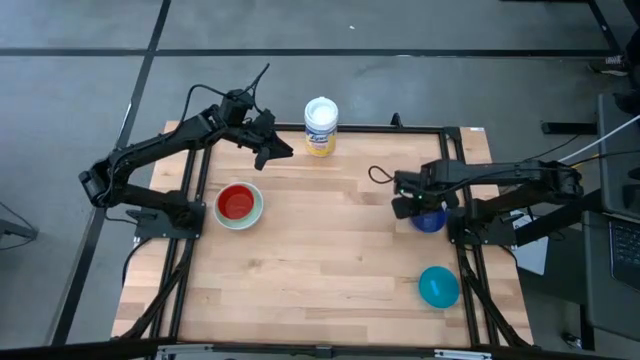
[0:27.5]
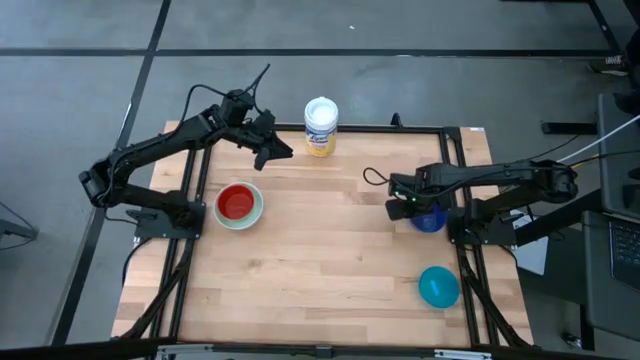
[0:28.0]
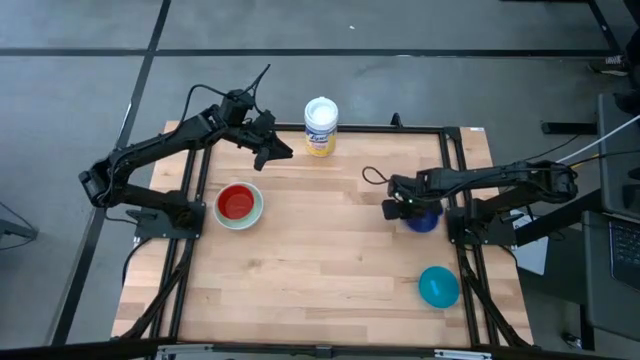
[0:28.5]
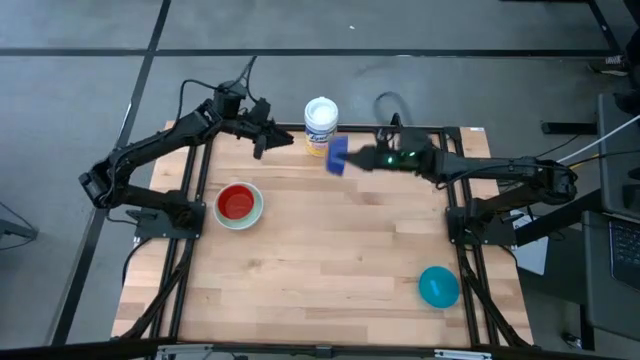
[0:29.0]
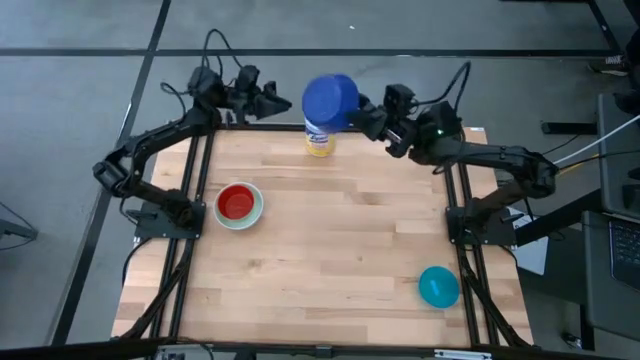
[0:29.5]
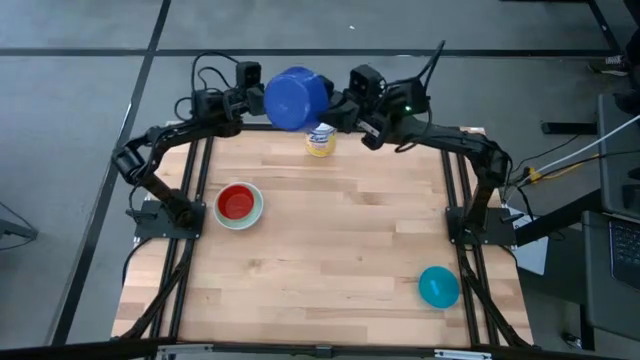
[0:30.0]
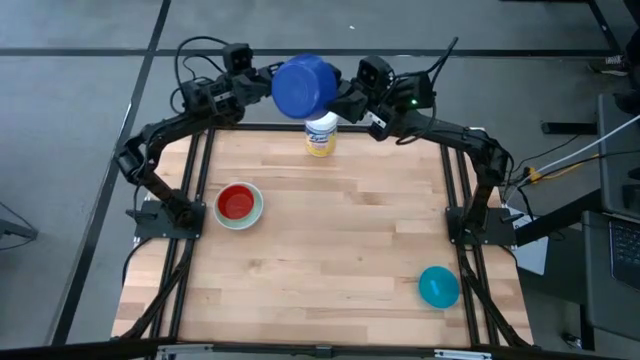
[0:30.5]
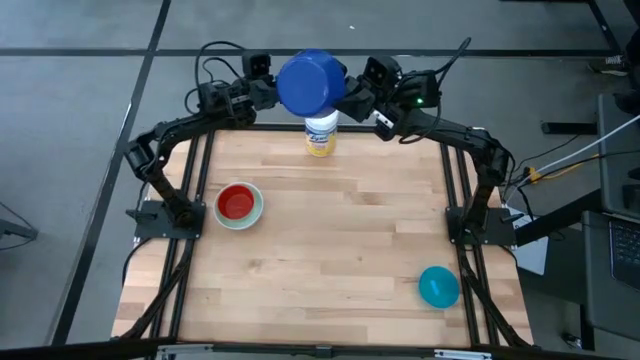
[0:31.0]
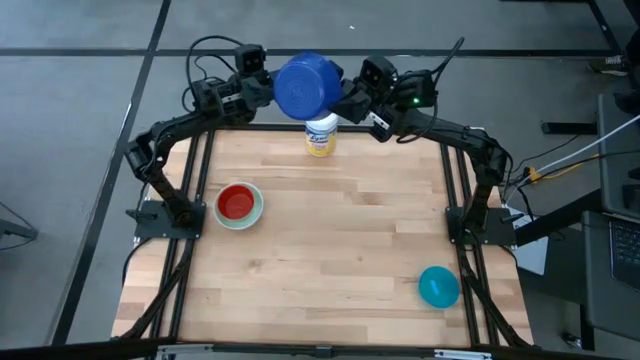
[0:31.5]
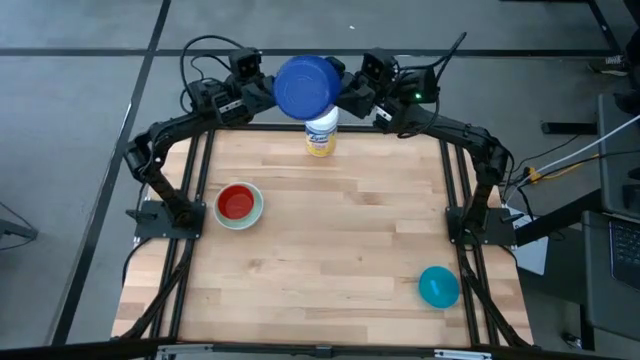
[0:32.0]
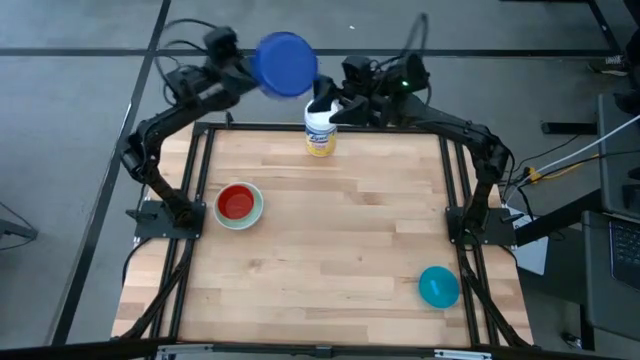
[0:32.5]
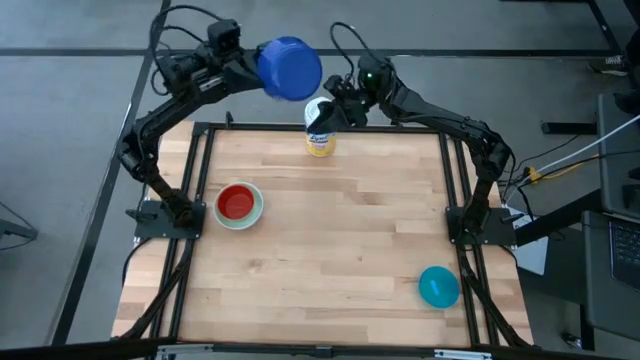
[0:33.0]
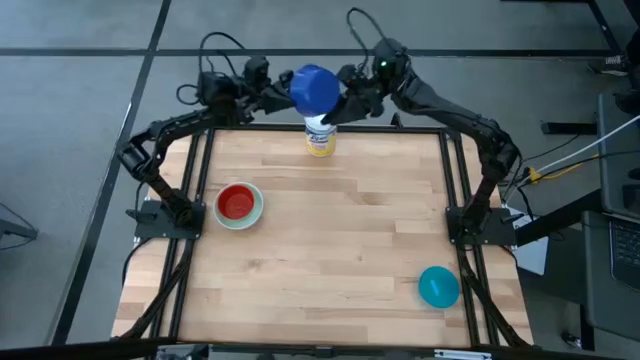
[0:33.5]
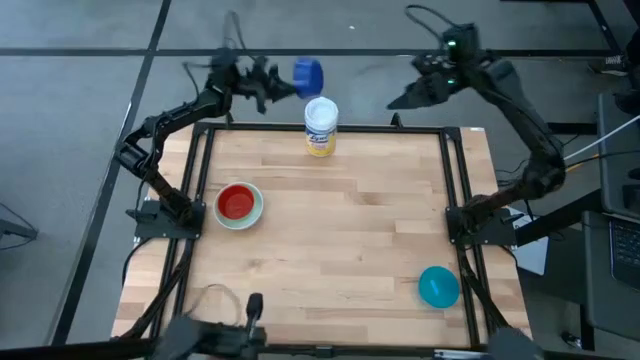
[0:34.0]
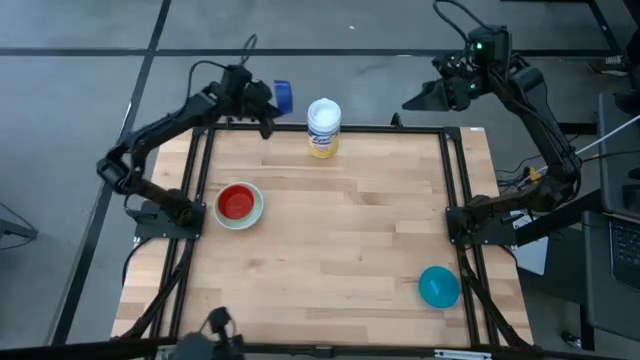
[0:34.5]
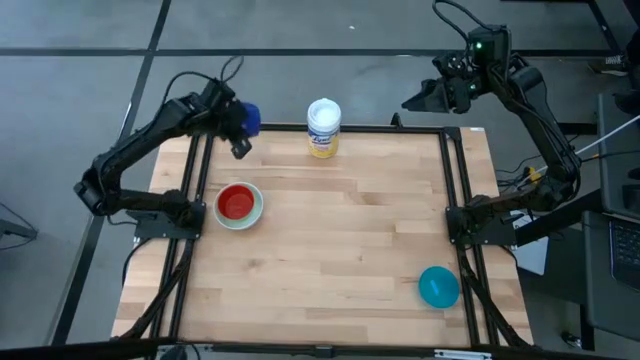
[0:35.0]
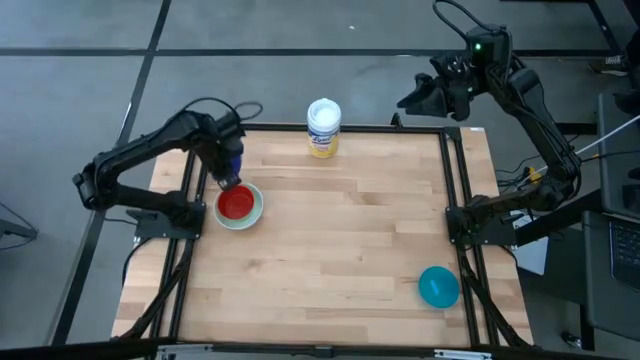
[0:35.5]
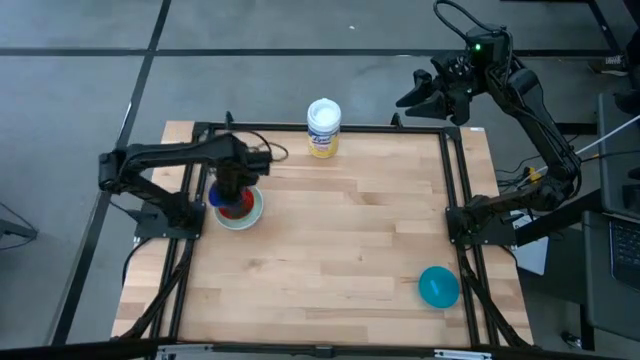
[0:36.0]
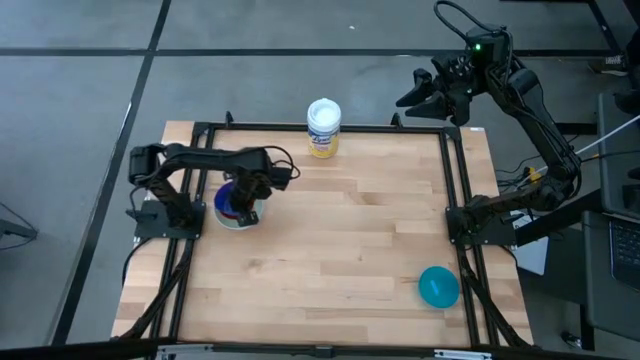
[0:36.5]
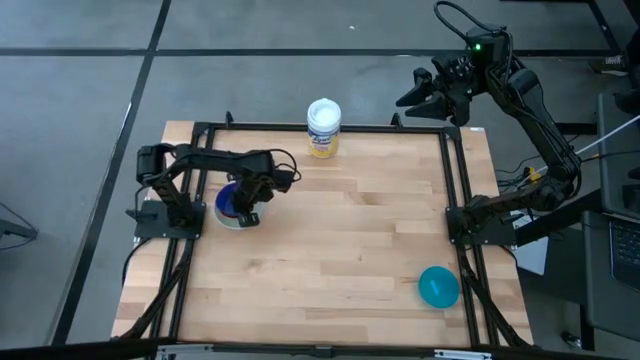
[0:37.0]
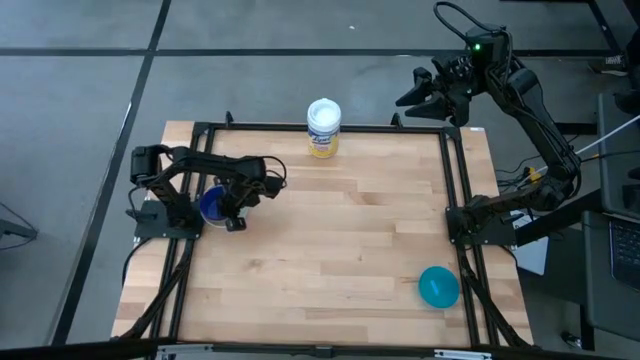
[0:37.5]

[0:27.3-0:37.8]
Stack the blue bowl on top of the red bowl on the table
